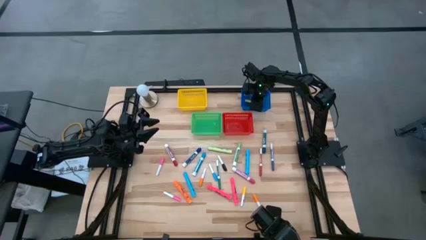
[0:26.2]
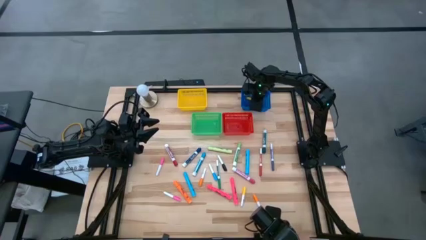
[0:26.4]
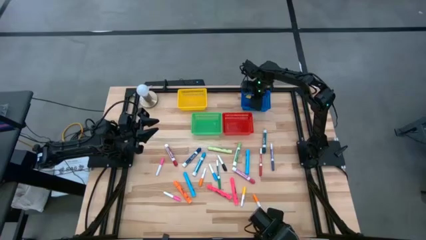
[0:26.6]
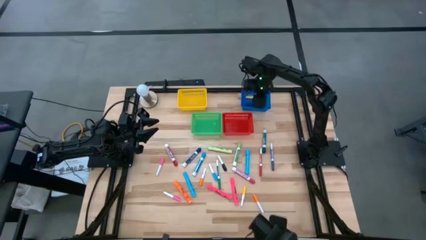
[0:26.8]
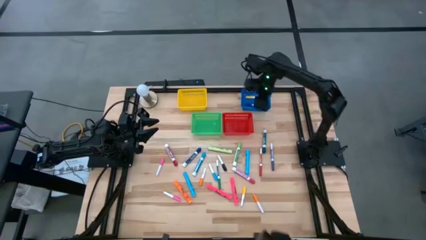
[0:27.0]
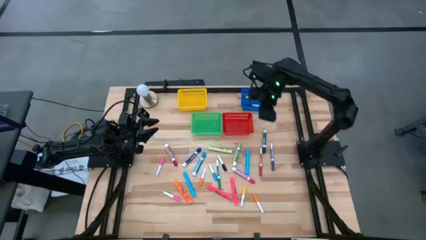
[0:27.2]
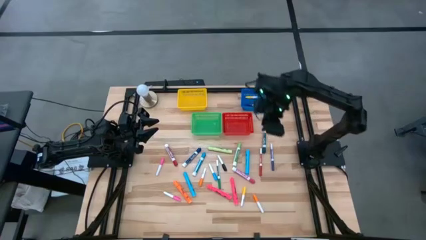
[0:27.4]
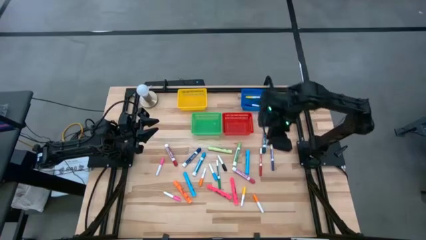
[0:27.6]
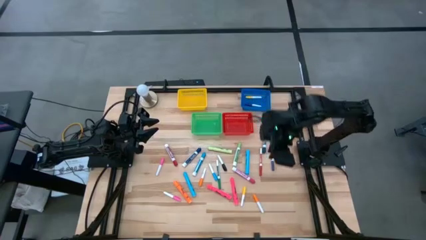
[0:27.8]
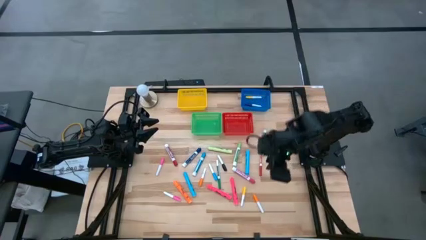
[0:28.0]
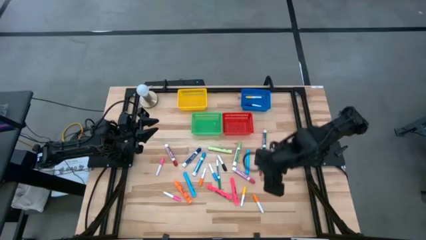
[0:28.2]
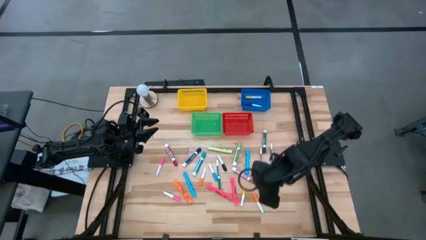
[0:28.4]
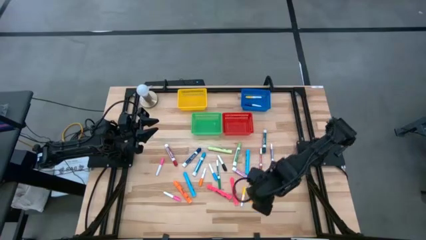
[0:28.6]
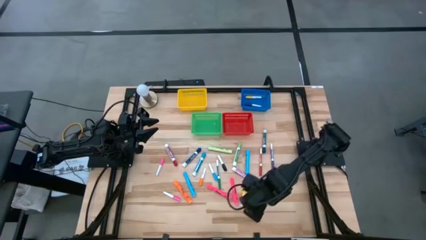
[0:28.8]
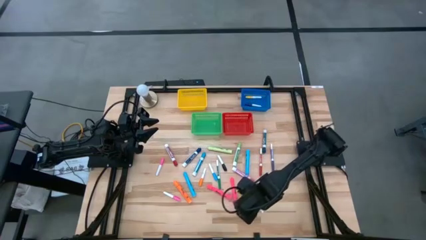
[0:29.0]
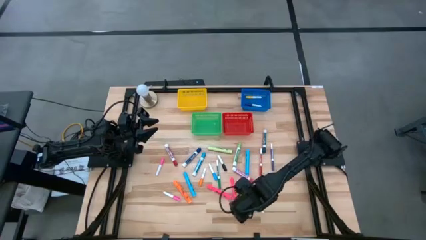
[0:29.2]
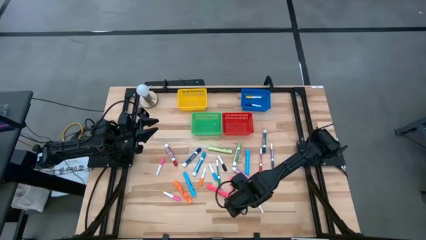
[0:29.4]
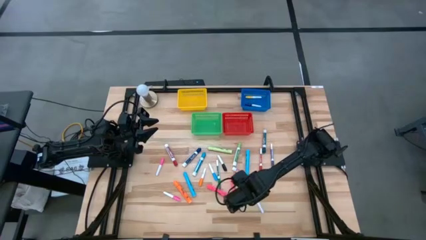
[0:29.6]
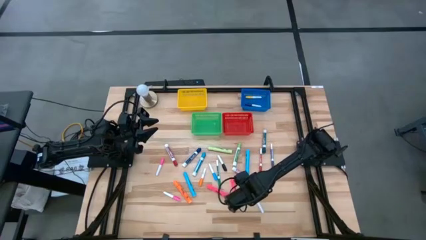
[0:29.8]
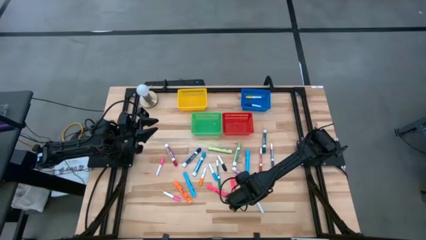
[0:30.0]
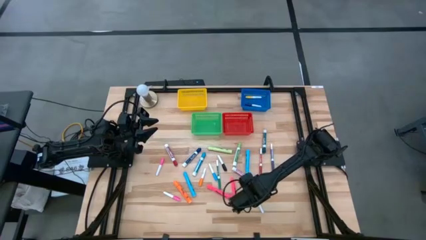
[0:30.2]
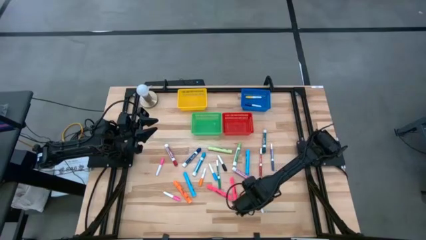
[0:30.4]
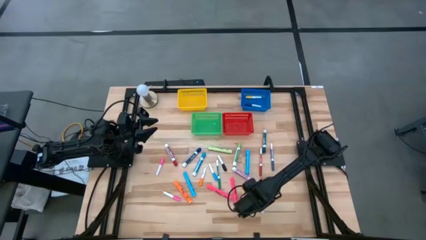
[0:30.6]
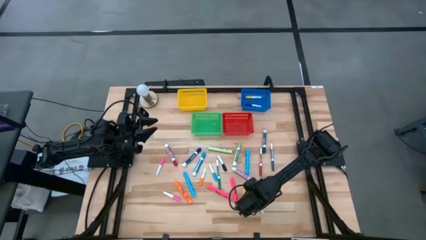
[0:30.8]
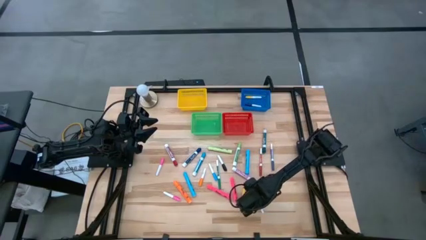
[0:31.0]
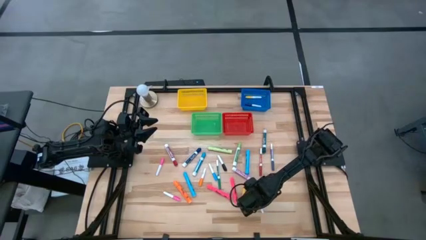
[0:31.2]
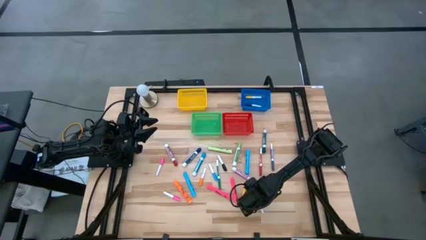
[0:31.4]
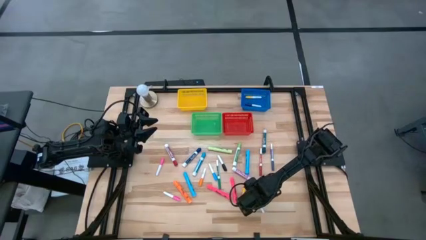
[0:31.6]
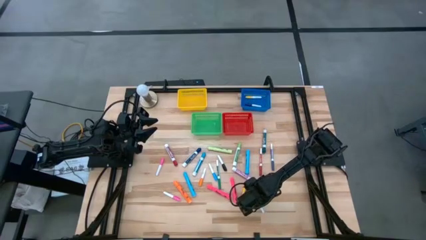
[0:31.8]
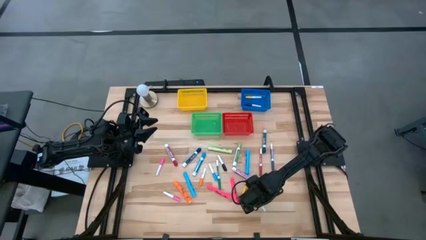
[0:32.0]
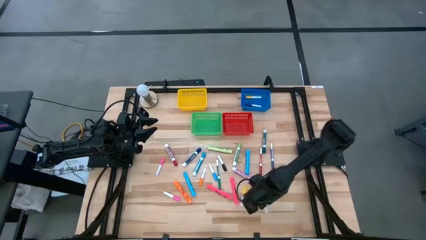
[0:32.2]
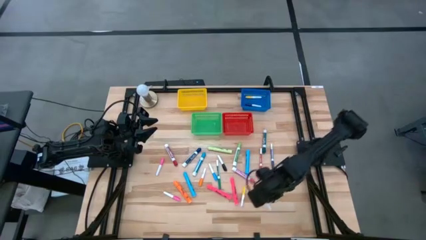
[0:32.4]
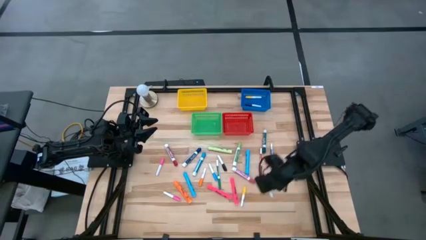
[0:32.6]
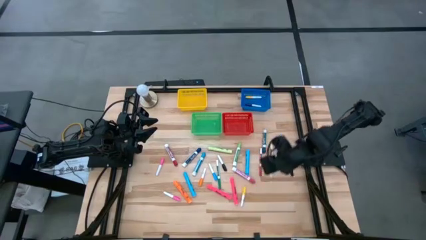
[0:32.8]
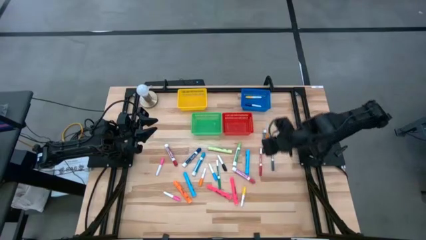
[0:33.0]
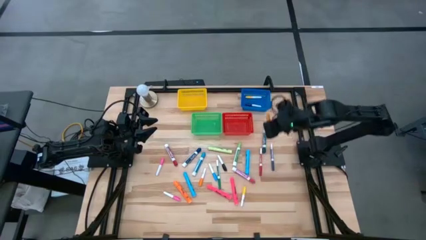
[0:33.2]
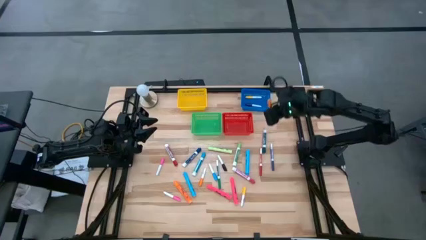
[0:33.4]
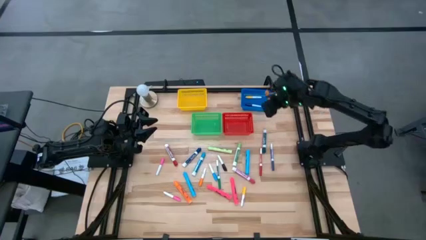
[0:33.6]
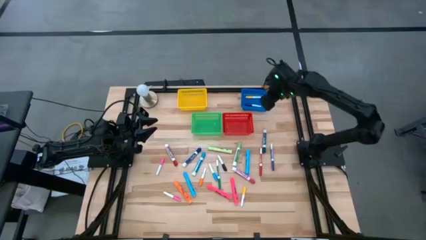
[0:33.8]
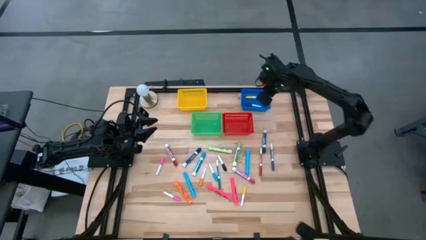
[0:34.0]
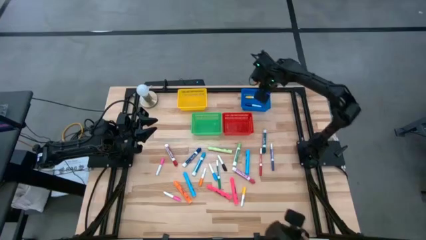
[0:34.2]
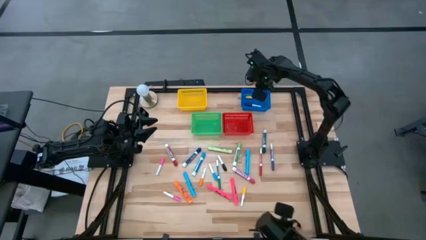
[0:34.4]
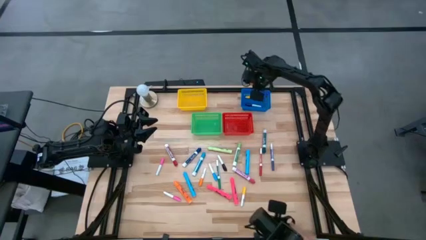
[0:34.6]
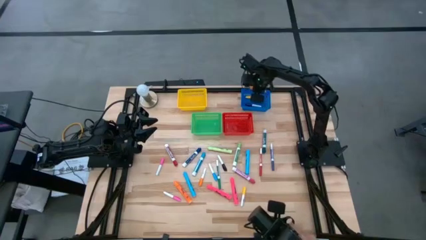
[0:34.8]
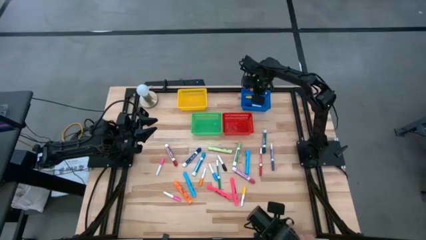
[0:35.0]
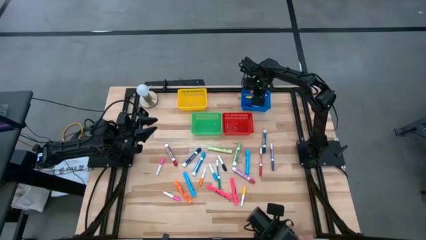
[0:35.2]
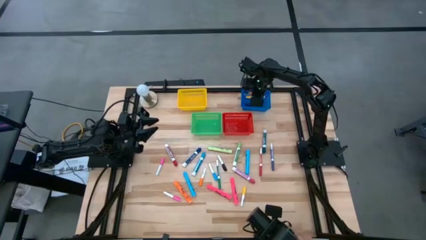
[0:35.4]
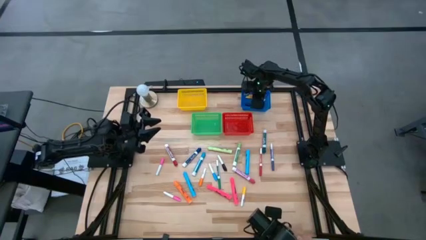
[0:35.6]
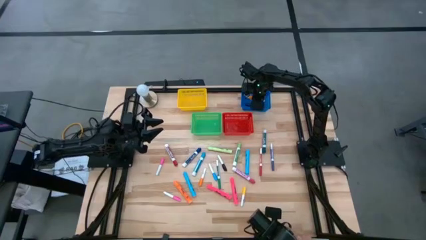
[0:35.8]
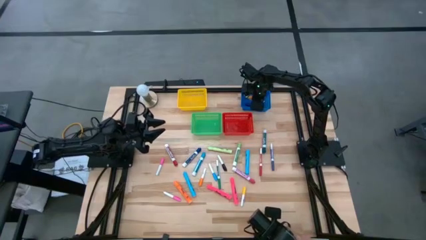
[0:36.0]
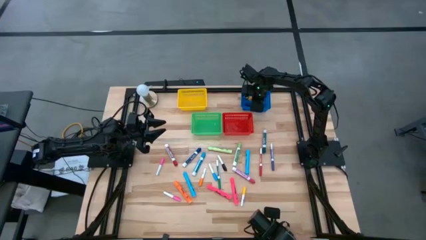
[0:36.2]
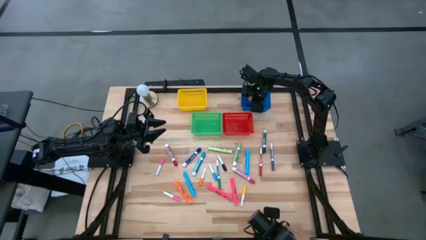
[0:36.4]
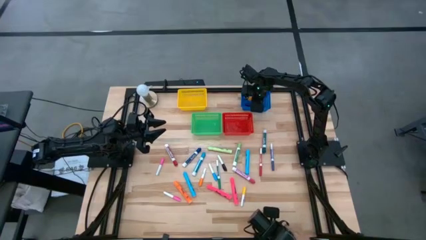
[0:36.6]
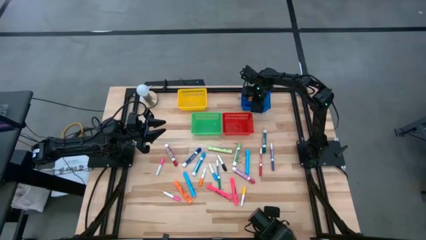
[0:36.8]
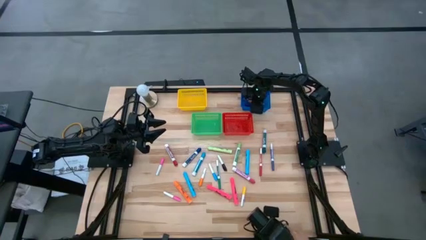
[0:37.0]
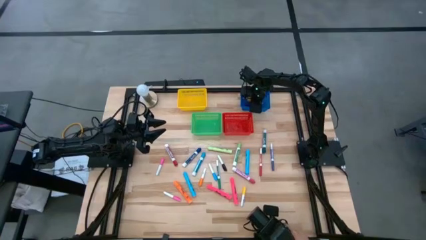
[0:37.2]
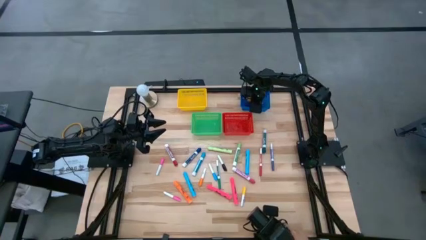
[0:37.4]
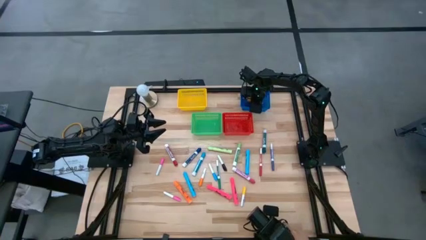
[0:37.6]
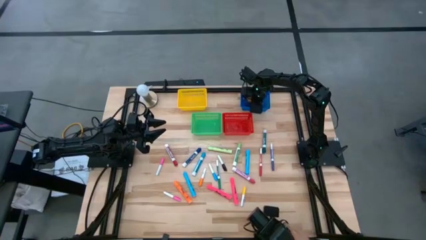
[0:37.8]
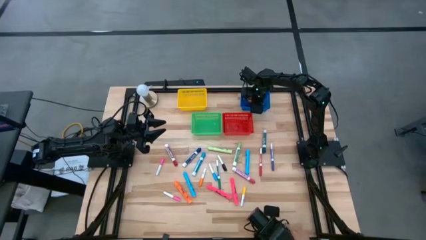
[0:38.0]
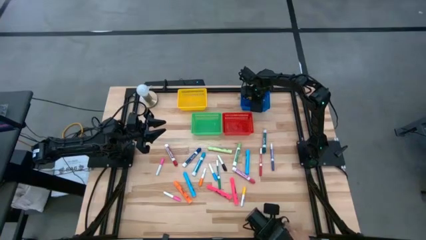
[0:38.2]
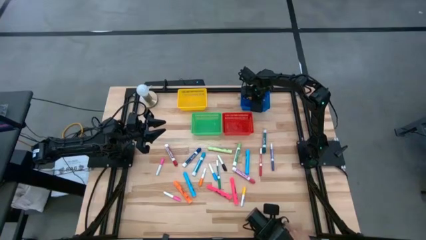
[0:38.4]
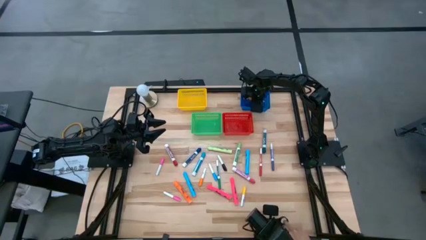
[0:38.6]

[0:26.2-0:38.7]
Task: Pick & Place Markers
Put the orange highlighter into the blue bin
